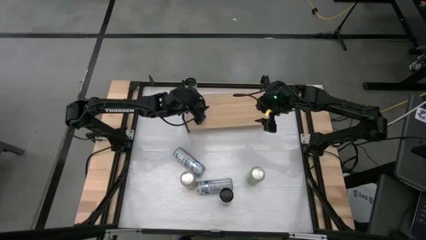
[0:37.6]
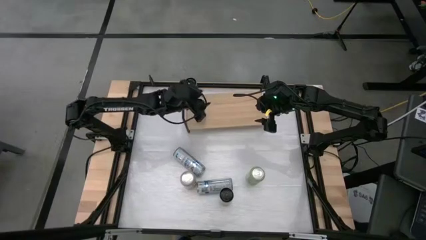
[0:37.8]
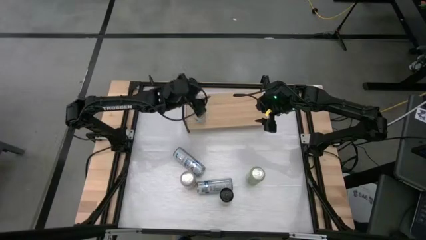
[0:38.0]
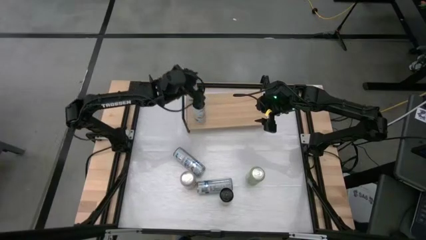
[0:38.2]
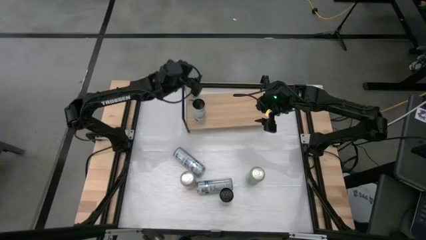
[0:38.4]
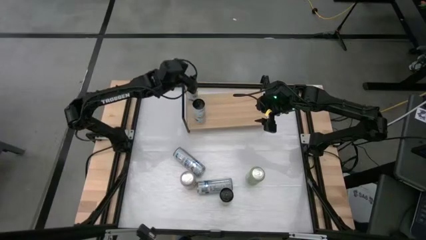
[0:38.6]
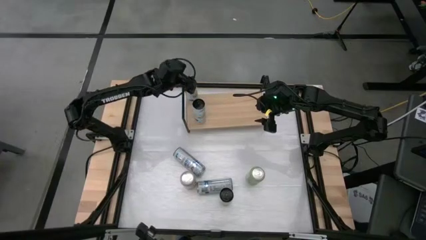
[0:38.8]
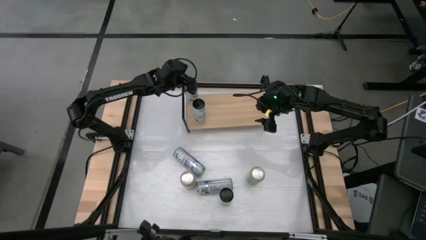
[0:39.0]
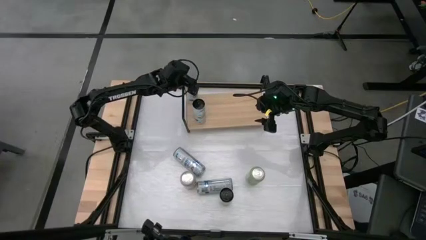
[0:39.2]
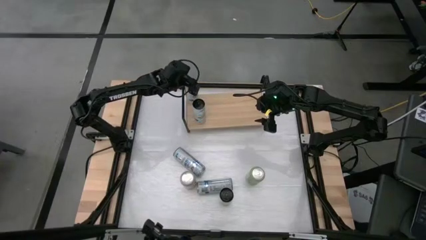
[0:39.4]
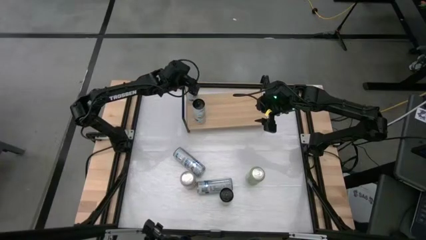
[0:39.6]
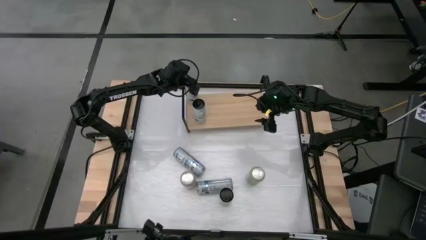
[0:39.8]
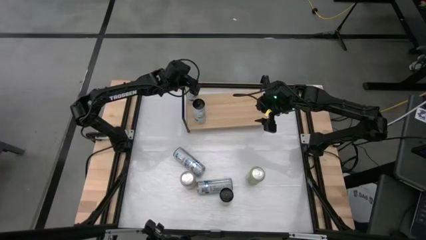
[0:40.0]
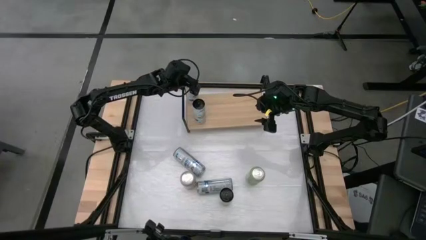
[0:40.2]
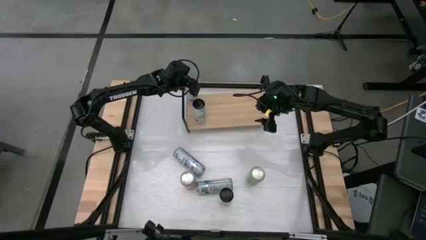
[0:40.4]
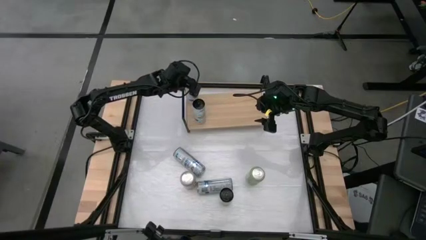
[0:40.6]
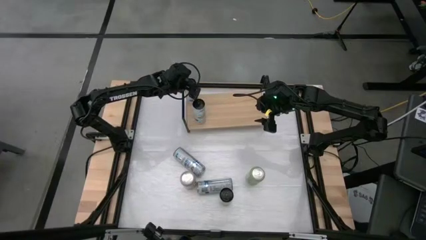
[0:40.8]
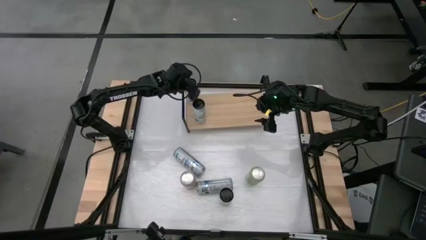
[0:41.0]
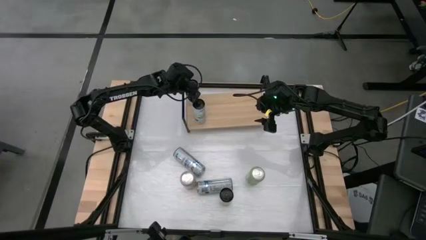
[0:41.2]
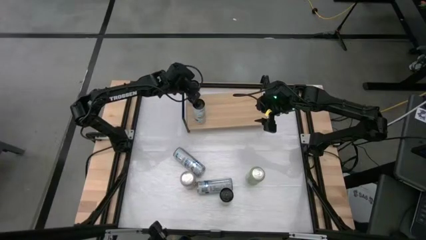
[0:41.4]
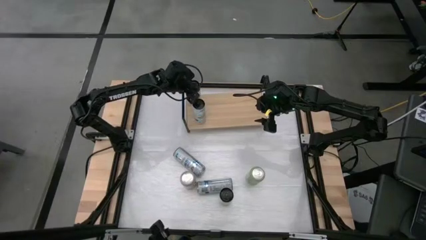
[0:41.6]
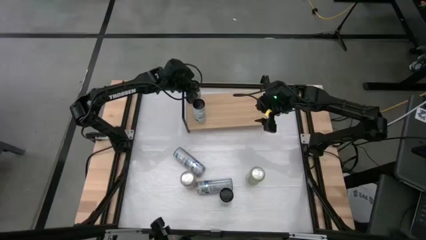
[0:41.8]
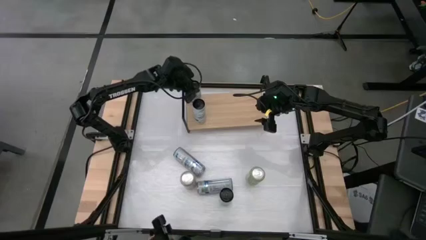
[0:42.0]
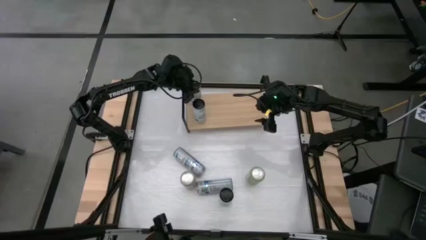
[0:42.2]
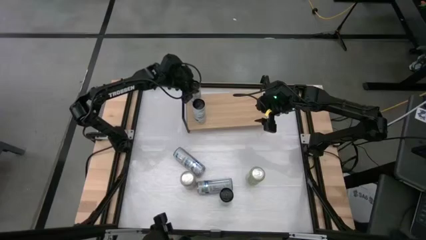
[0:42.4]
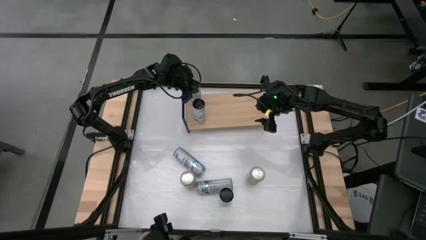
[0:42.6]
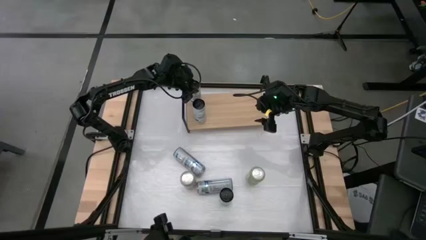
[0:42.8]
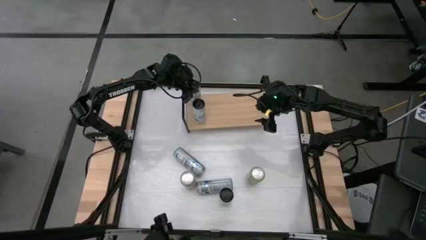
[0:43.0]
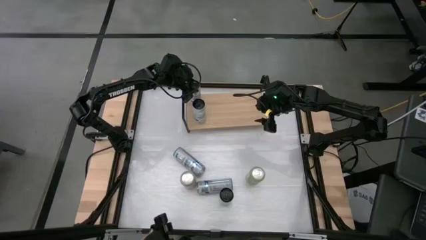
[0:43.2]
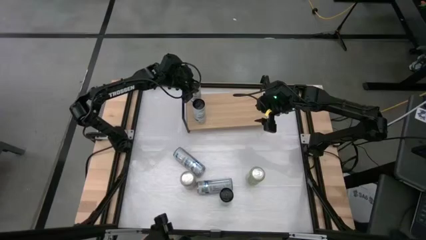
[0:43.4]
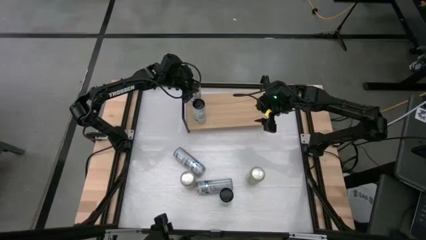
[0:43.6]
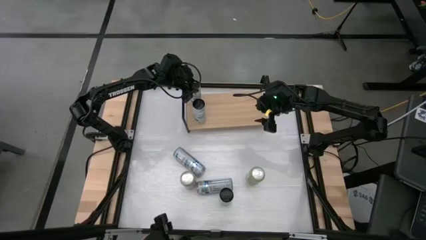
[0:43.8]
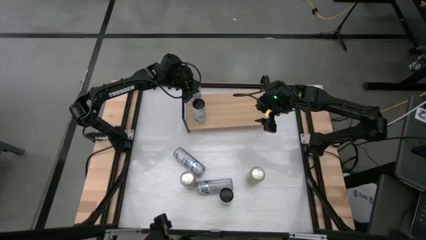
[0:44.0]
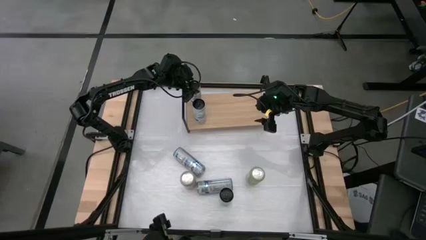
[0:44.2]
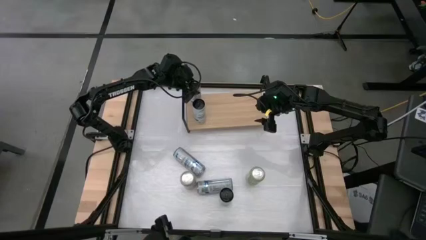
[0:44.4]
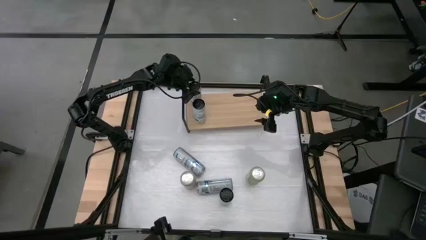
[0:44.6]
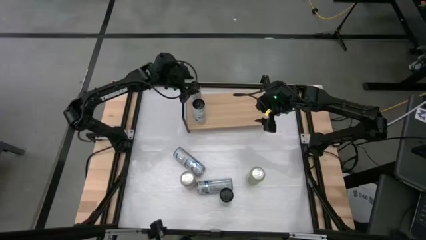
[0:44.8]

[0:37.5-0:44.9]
Task: Place canned beverage on shelf
Adjust the white-blue soda can on the shelf

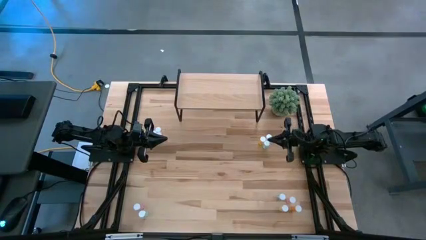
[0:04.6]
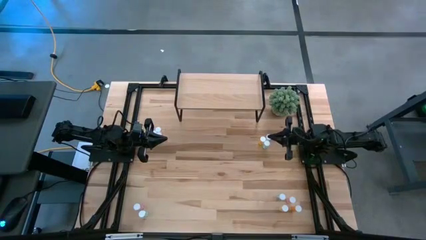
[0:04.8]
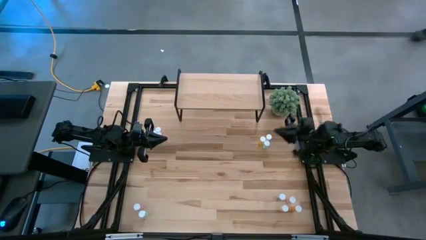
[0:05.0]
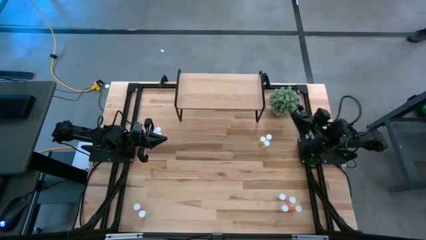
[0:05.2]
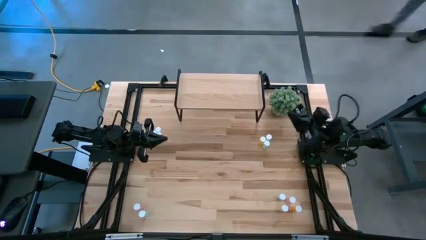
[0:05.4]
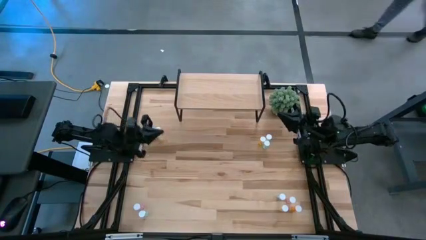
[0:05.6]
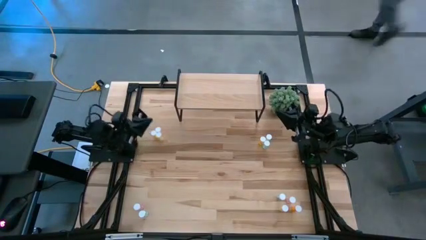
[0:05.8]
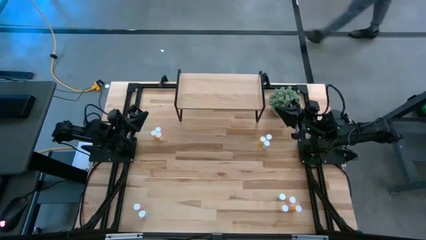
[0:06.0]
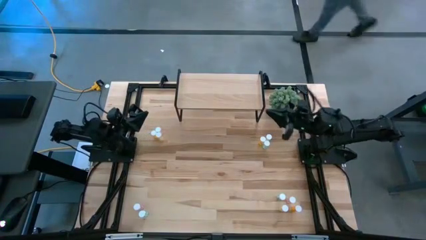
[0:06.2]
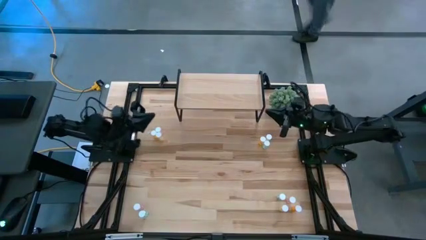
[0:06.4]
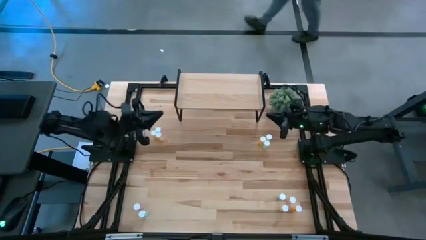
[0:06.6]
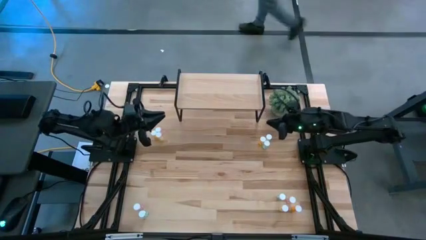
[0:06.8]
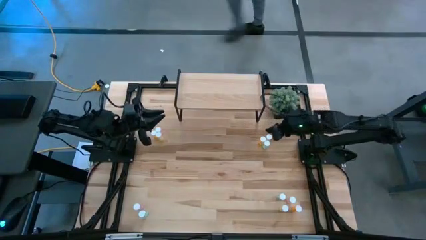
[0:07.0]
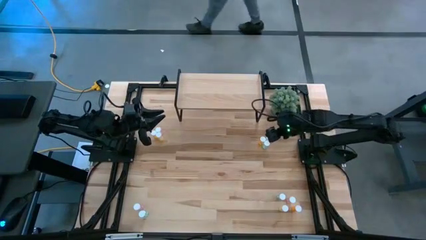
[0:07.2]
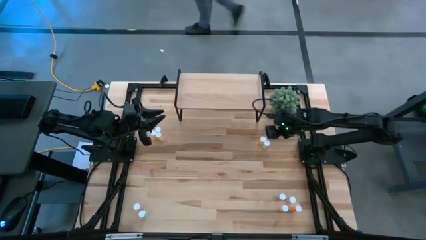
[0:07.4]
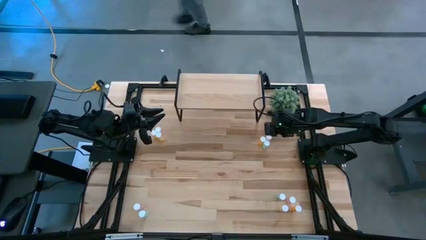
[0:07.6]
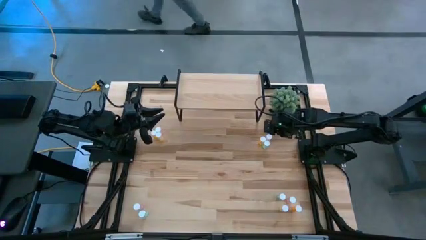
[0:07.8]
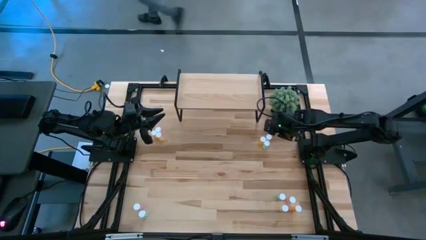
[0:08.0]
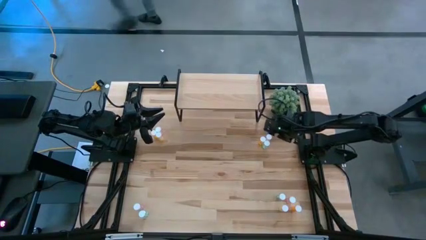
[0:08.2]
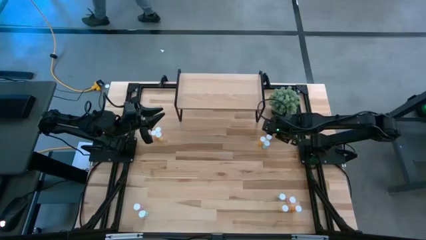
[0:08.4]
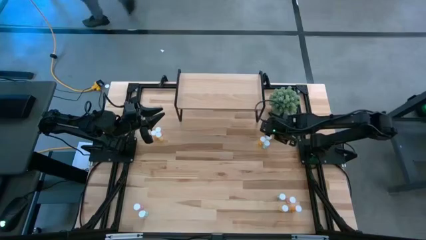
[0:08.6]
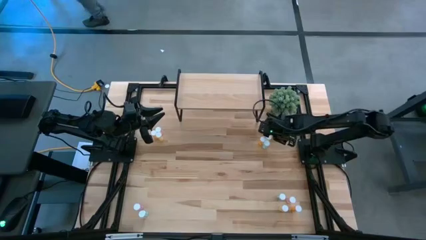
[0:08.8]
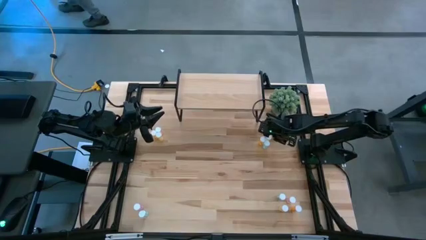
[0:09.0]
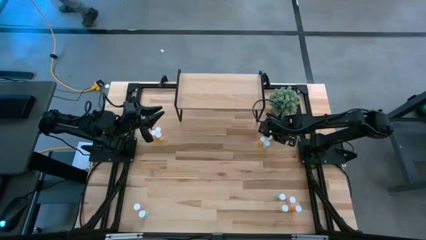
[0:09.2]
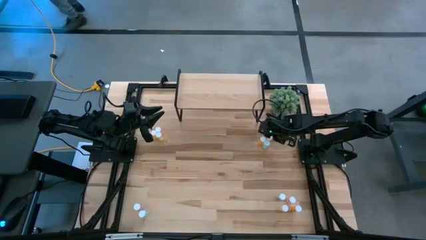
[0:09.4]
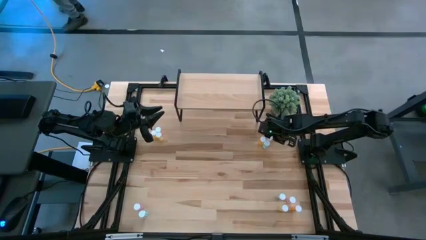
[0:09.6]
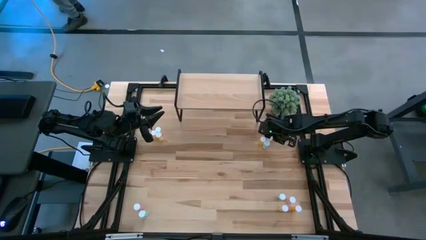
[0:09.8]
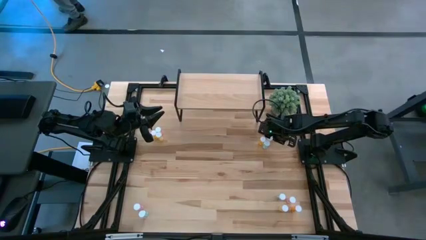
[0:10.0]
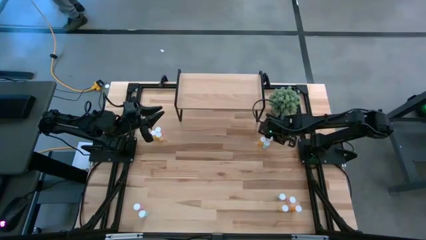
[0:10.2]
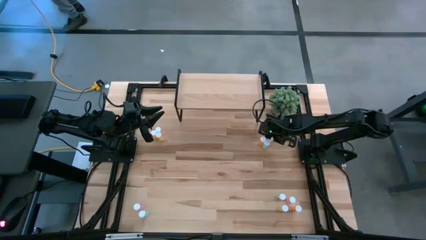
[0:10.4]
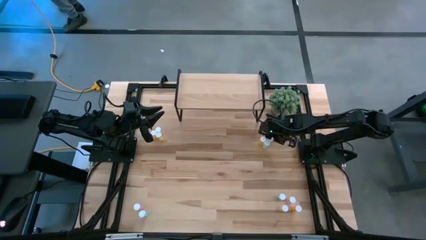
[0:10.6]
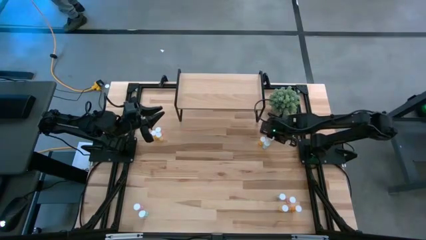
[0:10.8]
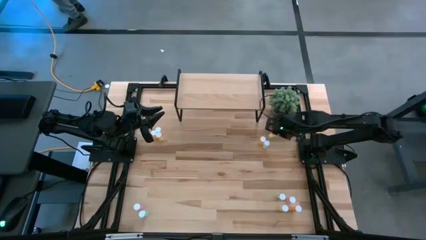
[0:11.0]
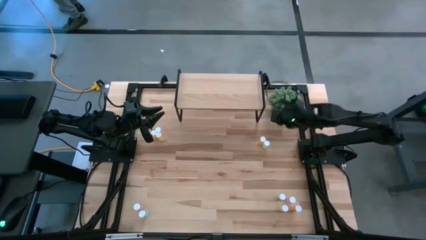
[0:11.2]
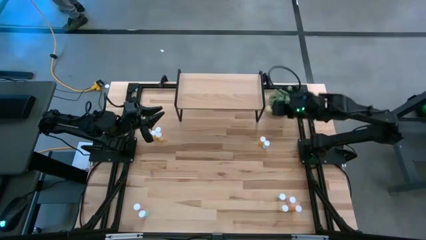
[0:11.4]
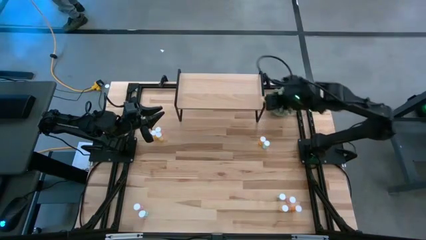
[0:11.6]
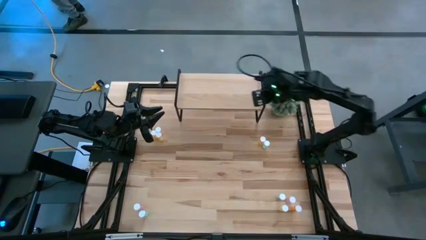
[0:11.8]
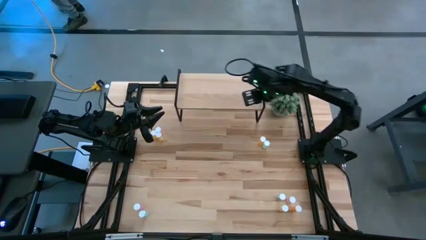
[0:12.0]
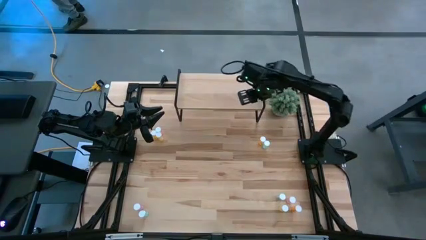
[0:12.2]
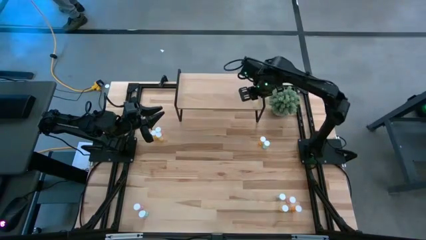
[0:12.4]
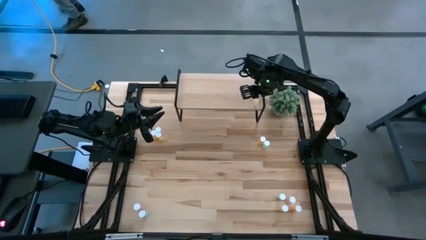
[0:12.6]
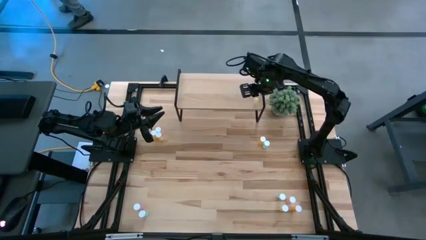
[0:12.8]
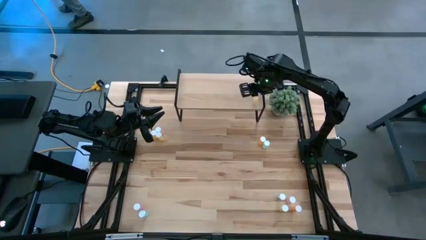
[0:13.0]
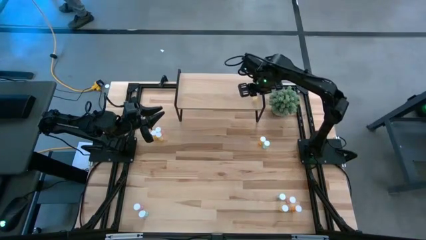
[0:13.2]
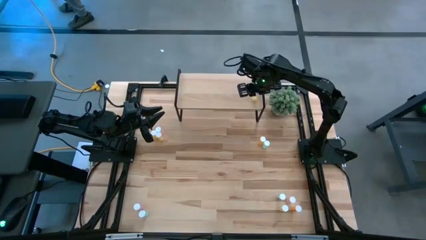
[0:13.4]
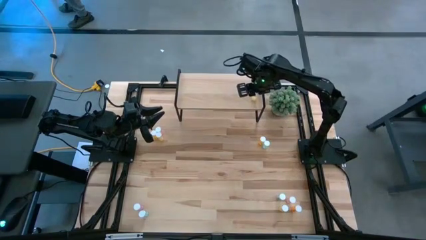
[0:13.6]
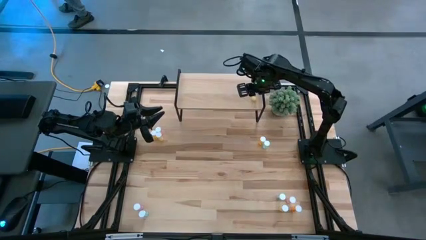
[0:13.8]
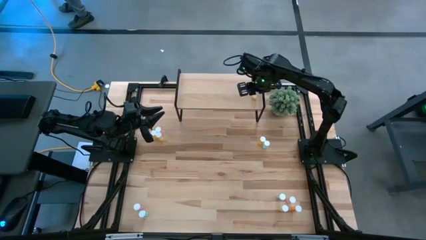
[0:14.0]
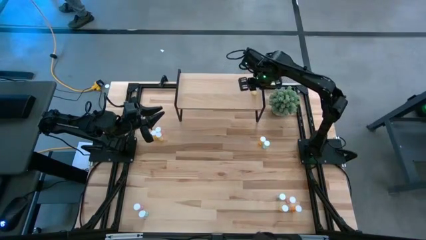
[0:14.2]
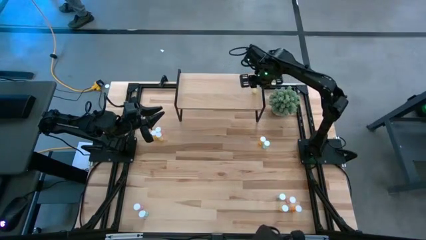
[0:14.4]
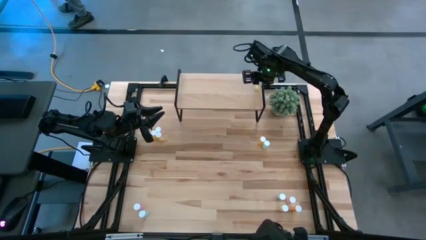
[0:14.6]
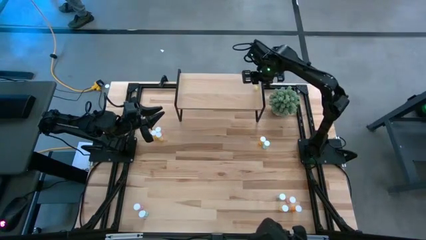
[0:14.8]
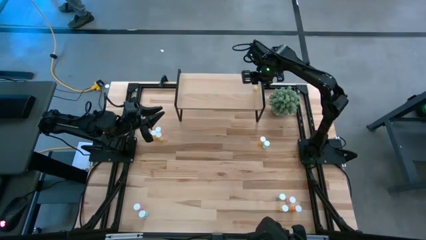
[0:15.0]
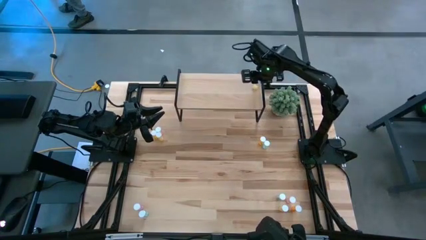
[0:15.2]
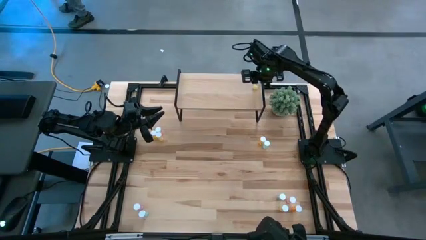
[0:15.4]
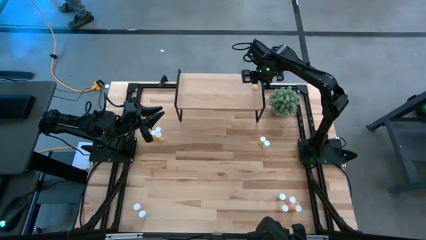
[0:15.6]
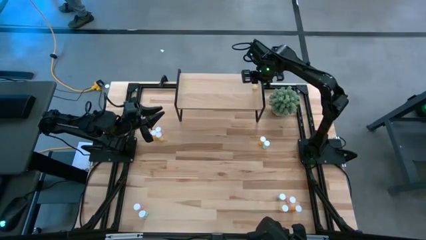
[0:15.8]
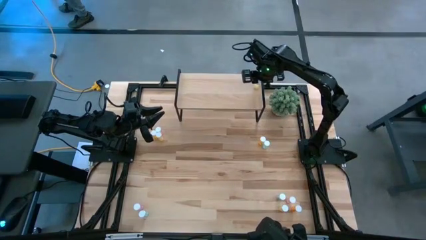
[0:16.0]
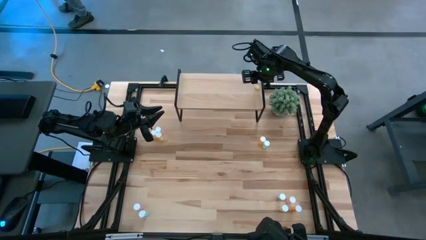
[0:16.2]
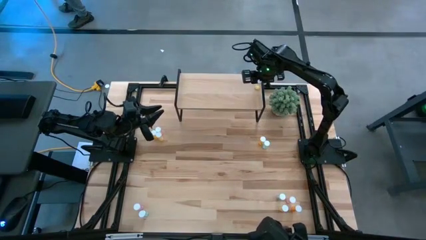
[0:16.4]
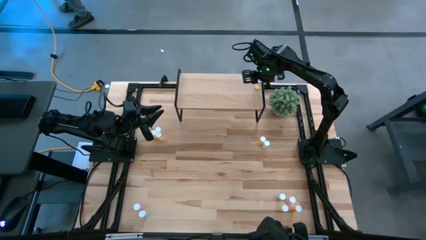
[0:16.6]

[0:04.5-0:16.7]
Task: Pick and place medicine bottles onto shelf by color
Put the top right yellow pill bottle on the shelf
